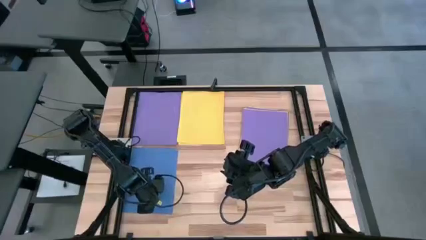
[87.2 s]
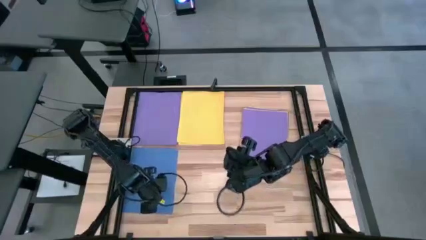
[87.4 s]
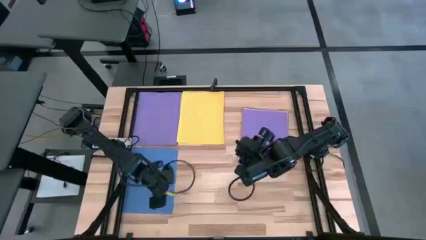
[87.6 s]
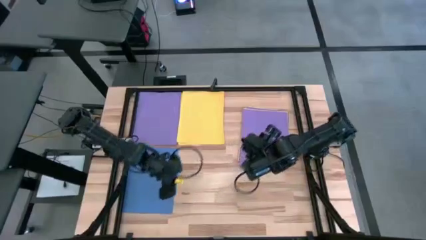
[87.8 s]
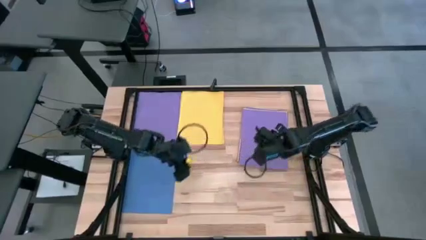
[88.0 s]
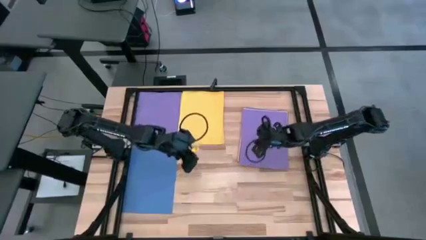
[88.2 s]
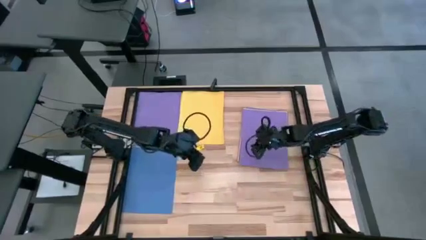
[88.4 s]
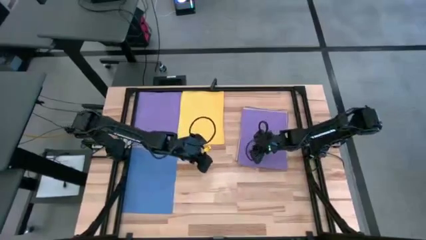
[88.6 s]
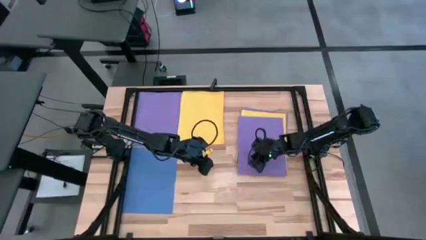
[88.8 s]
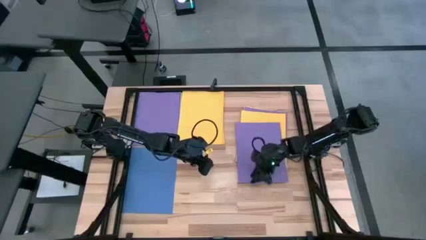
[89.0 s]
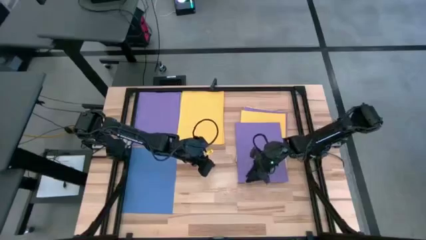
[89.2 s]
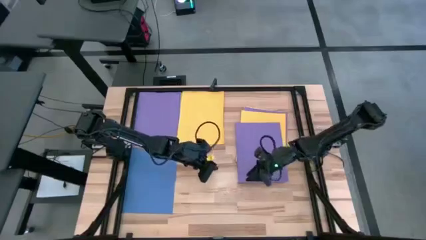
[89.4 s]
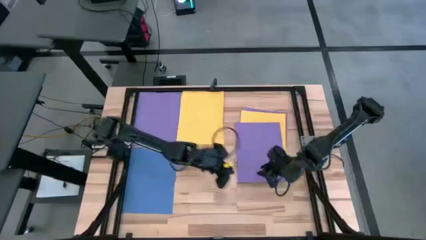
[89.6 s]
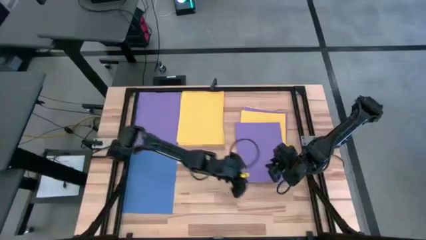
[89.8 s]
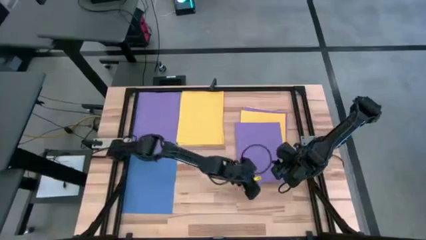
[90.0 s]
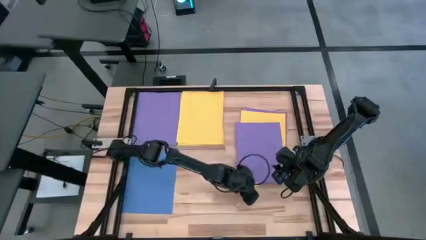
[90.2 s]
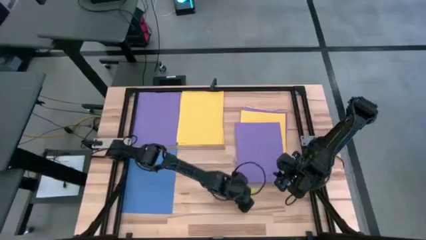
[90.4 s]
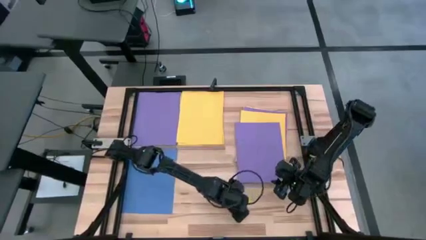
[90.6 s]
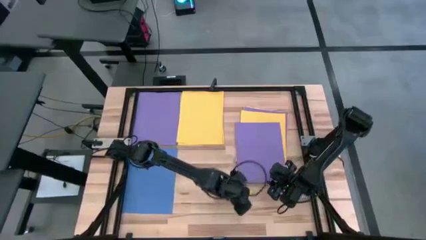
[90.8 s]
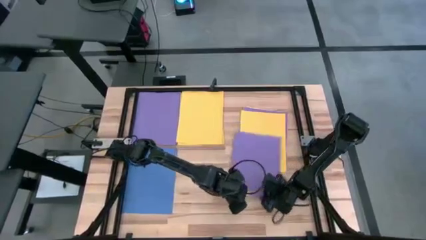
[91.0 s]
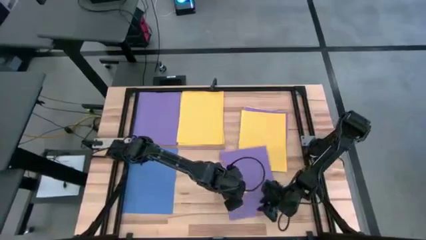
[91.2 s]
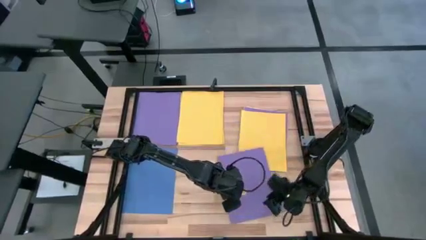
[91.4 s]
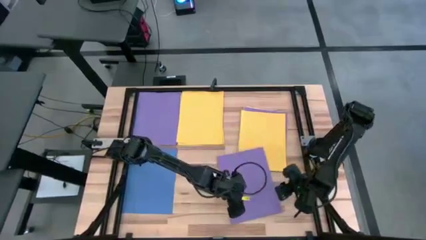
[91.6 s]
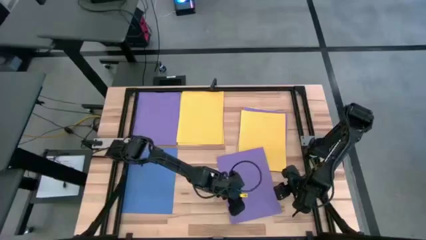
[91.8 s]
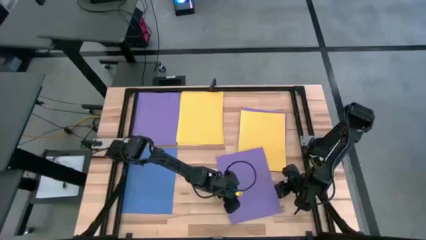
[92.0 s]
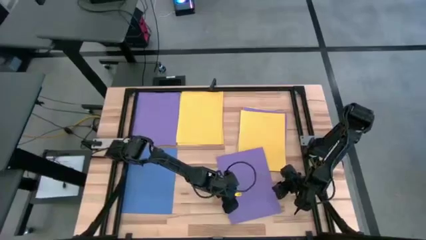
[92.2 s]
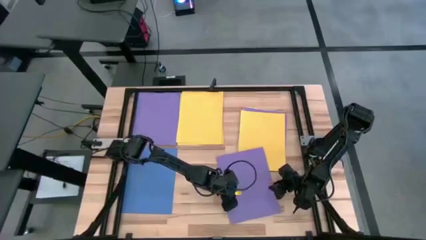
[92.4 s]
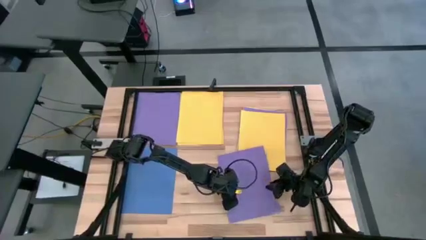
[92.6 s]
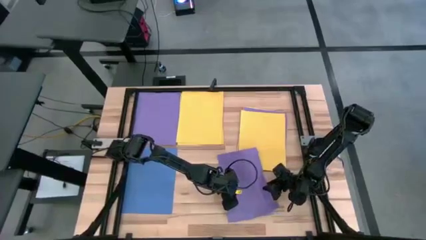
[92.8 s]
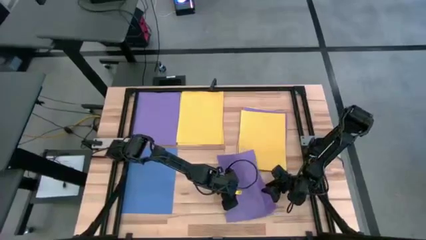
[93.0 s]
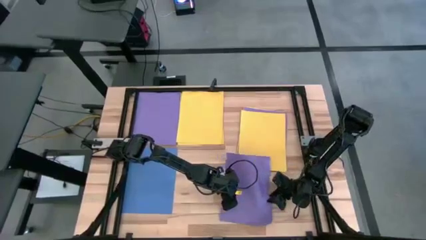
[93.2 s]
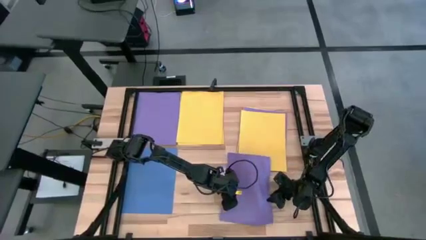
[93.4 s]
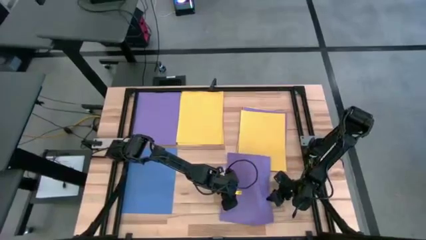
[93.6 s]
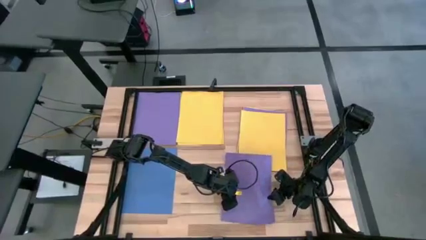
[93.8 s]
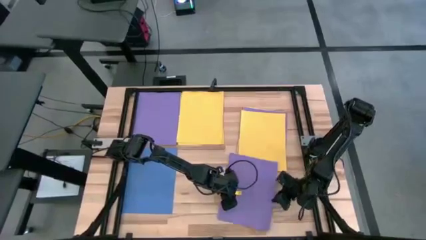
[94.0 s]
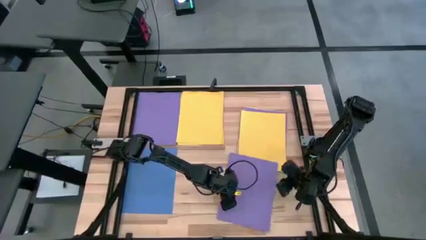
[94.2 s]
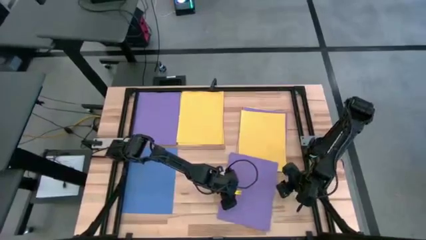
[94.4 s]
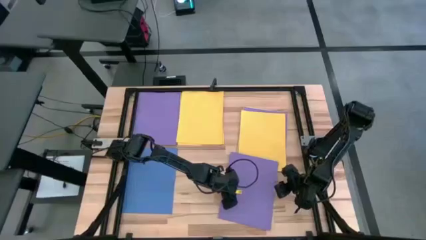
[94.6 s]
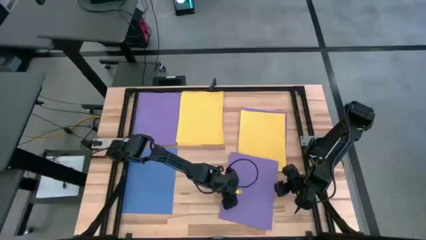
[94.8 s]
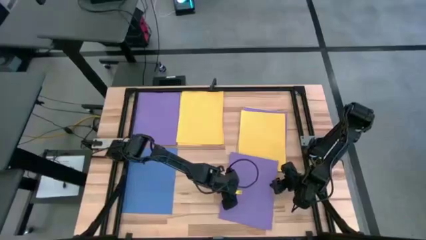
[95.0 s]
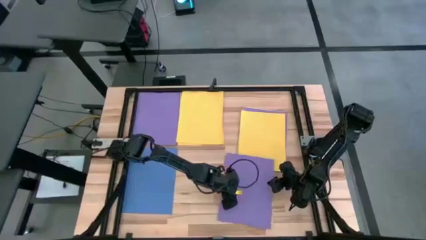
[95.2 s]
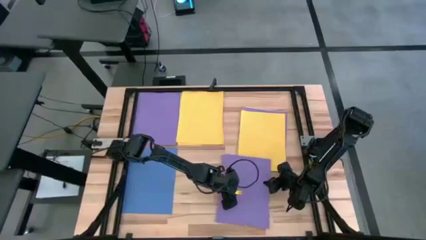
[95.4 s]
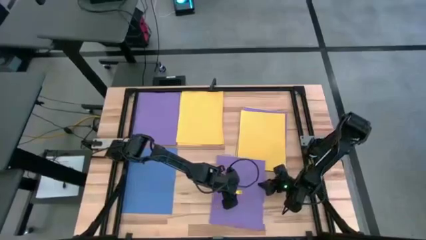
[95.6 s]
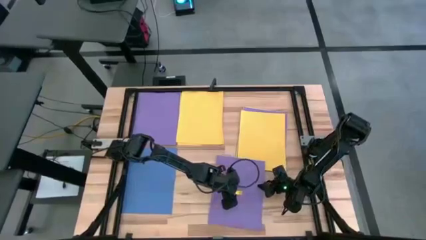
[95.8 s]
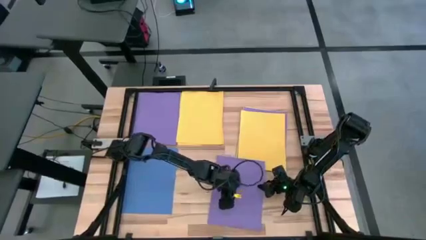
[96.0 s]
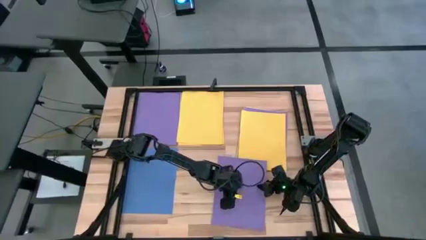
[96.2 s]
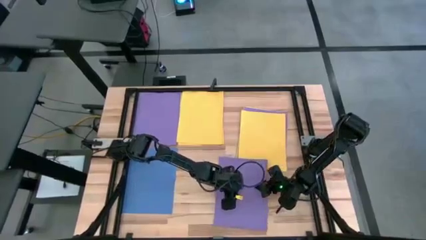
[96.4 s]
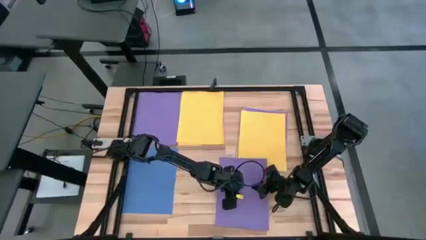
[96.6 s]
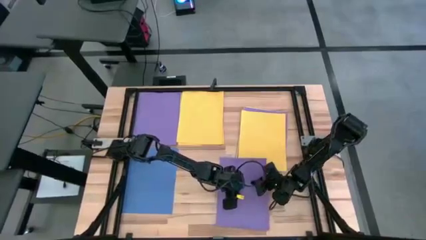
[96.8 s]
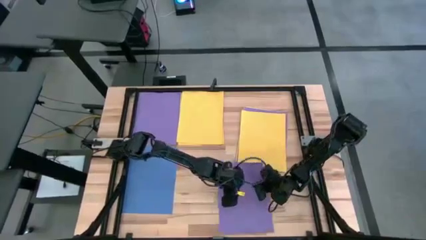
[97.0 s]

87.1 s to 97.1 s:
Task: Organize paper
Stack the purple colored paper on top of the other purple colored paper

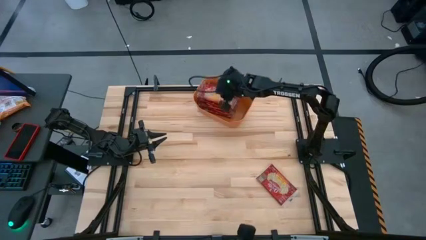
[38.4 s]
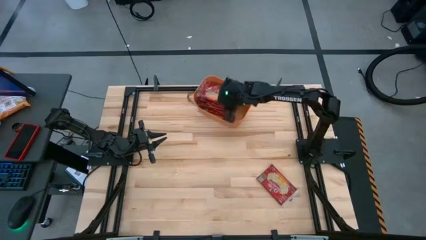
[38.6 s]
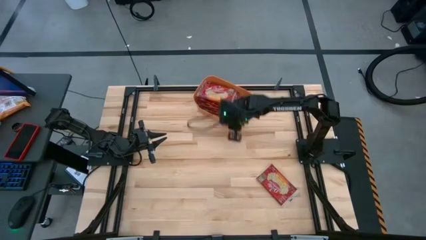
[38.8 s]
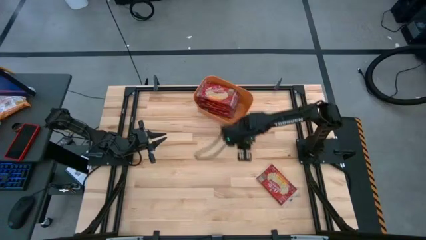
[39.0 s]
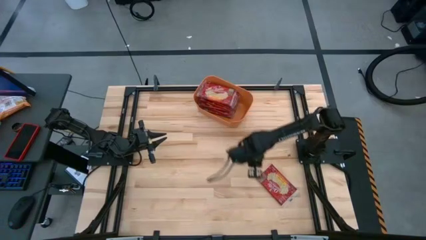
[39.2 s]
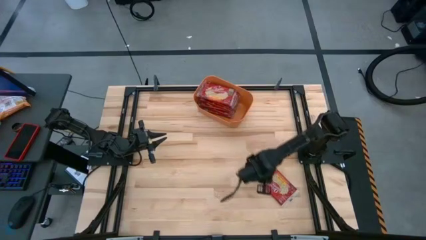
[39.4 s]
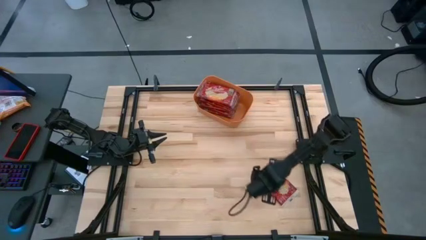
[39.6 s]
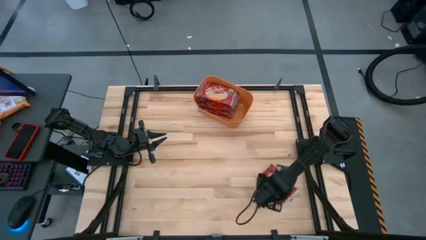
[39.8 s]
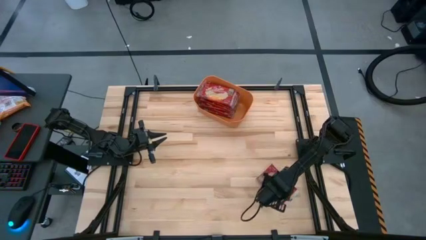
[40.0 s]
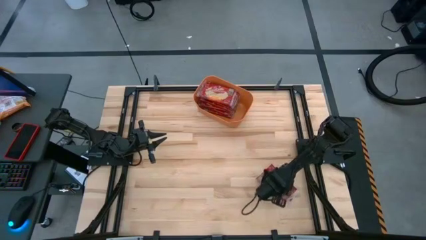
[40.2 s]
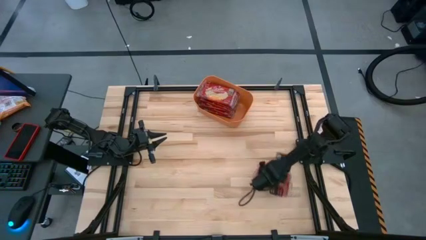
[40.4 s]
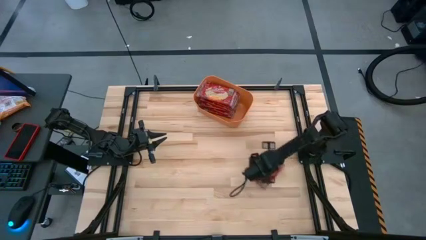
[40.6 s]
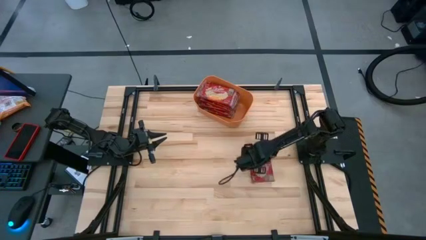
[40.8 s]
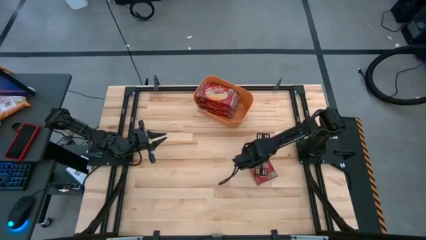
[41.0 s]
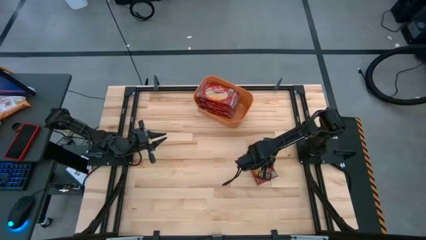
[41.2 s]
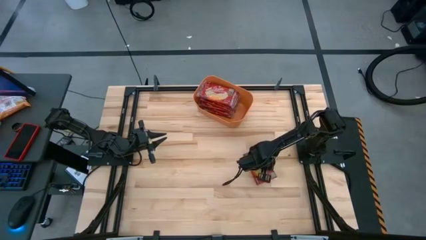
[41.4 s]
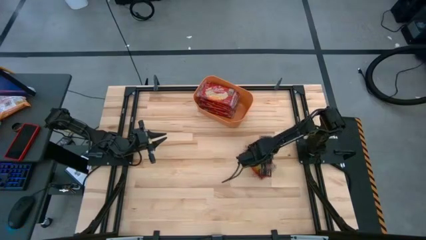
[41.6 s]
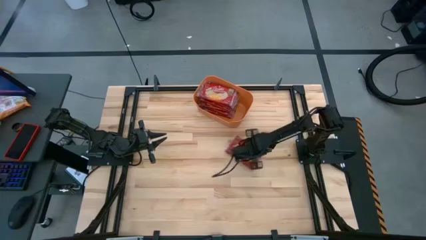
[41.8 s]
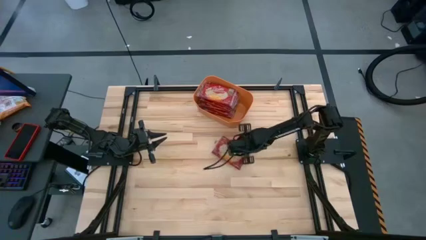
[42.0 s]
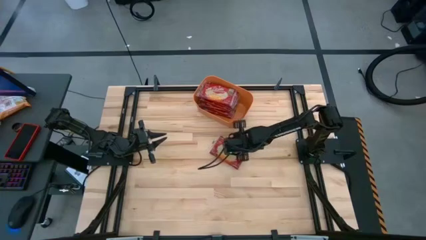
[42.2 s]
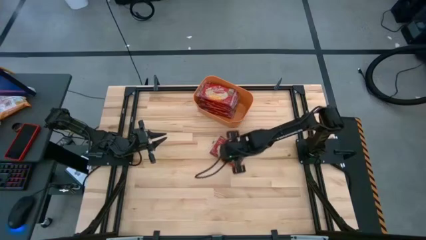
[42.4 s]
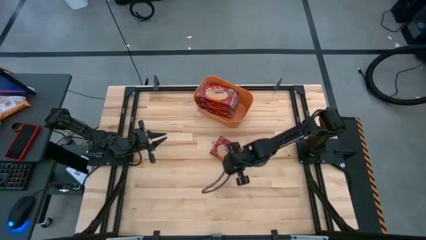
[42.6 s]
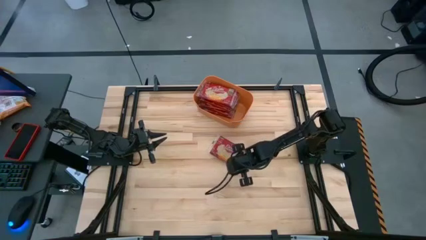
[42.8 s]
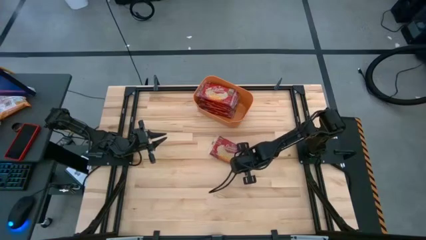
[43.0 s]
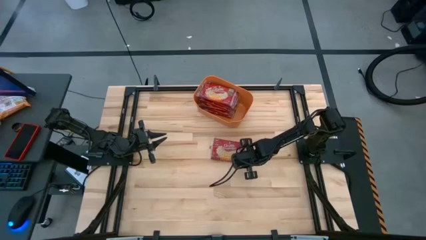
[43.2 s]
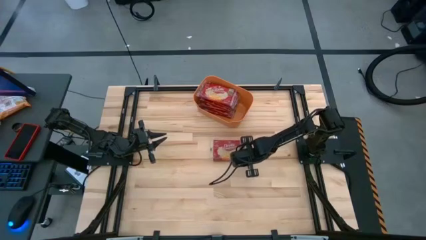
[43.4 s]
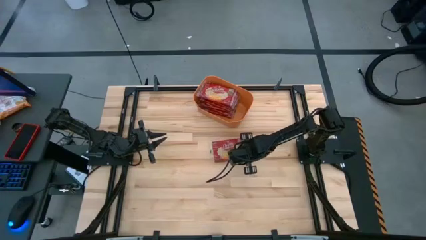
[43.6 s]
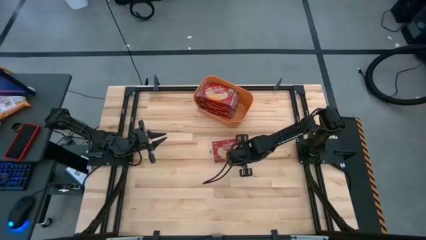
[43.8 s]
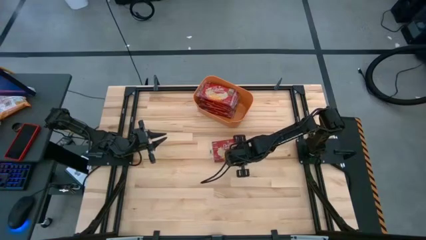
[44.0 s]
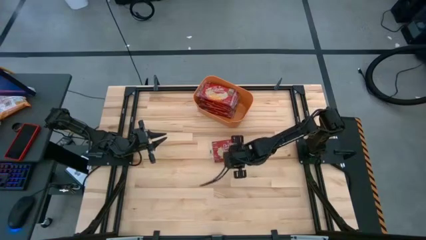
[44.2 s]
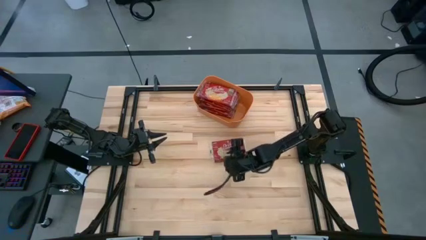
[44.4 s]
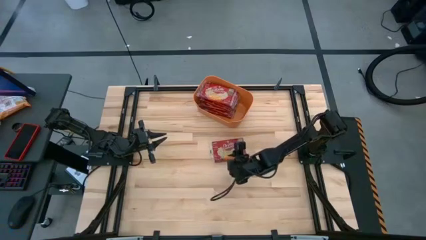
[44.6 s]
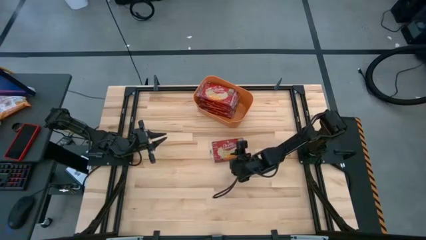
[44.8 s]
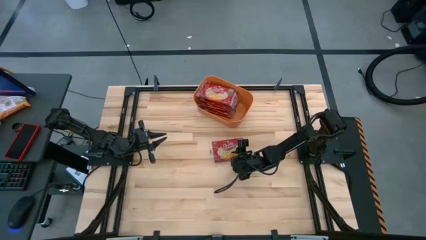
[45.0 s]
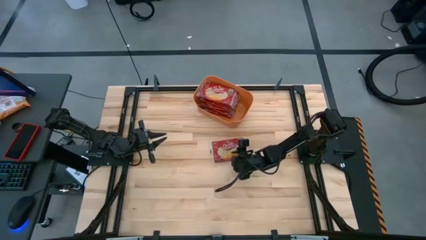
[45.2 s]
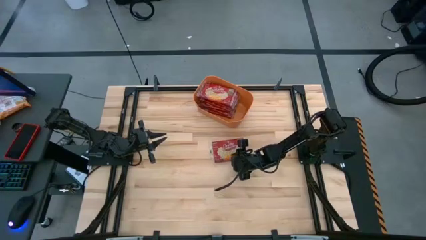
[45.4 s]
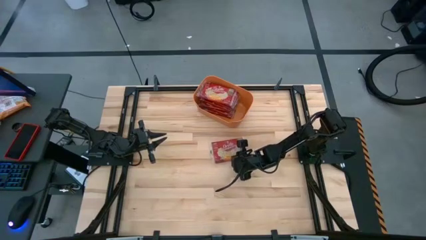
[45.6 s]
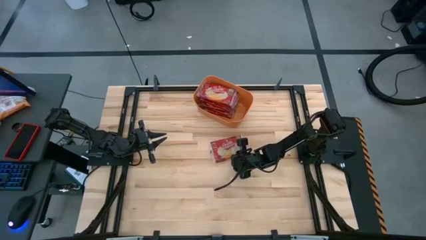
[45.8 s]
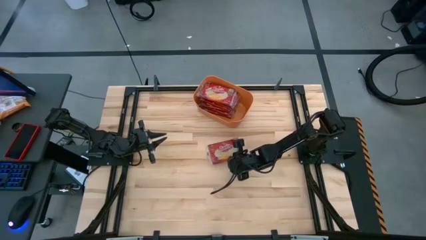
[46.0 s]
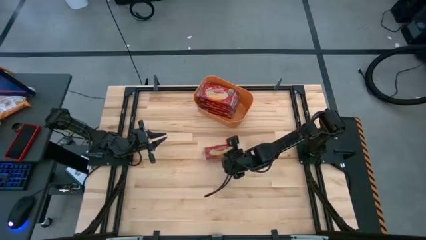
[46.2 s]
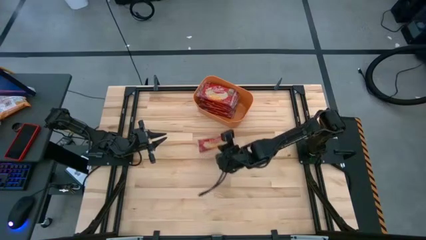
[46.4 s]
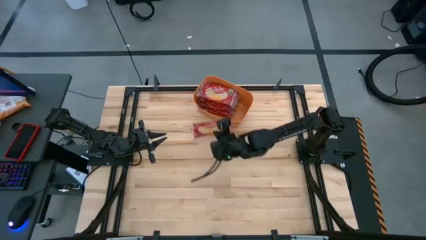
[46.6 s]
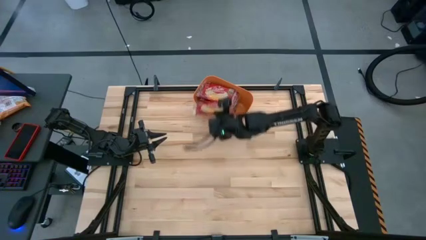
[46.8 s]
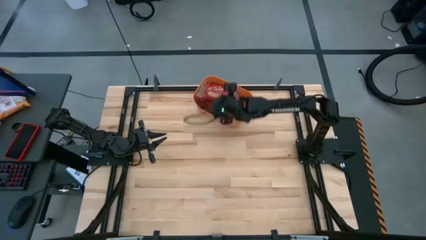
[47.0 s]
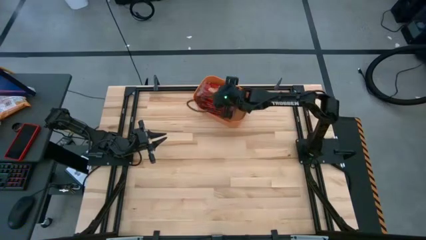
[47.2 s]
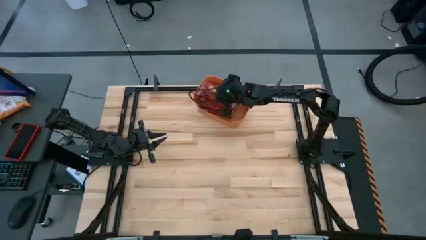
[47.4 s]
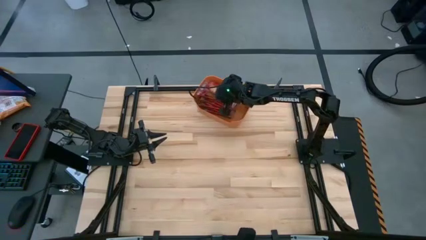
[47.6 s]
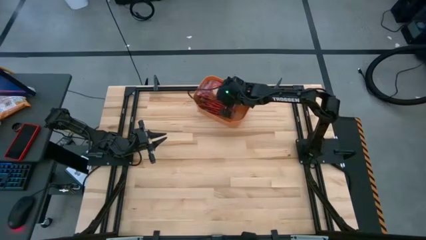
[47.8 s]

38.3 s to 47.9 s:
Task: Sort popcorn bags into baskets
Put the red popcorn pack into the orange bin
